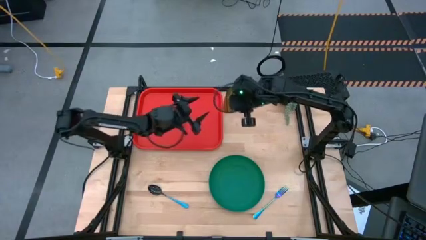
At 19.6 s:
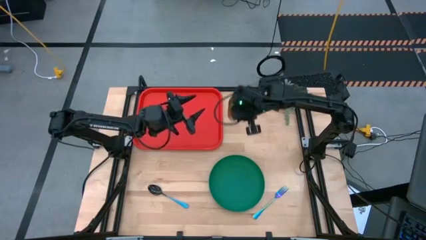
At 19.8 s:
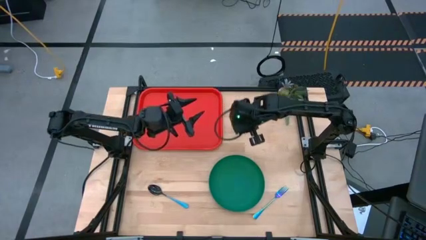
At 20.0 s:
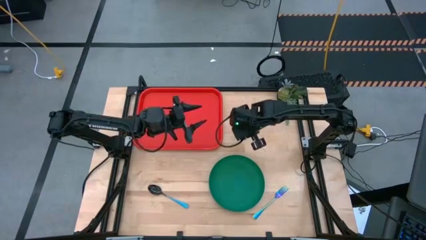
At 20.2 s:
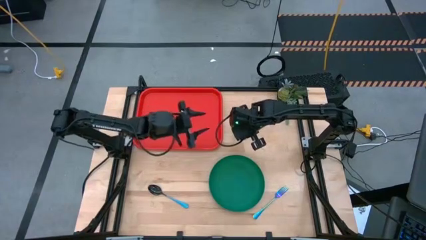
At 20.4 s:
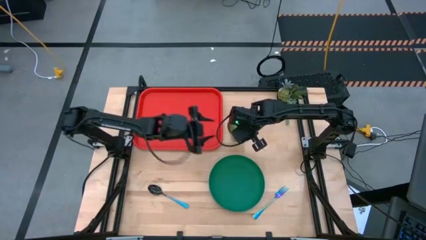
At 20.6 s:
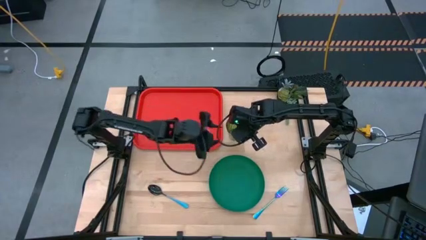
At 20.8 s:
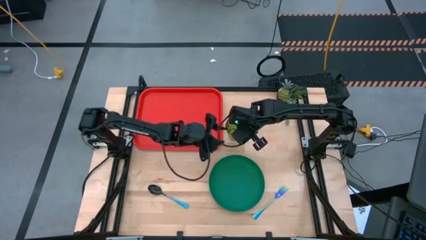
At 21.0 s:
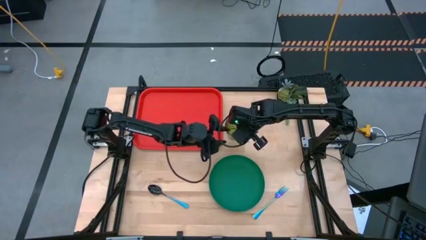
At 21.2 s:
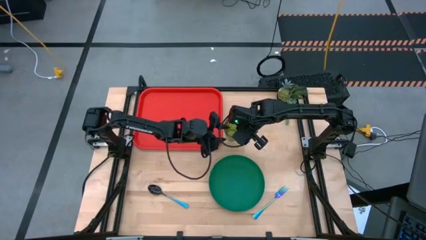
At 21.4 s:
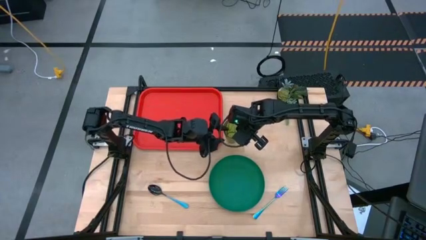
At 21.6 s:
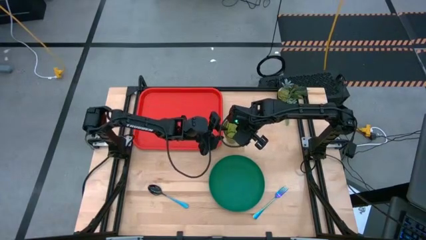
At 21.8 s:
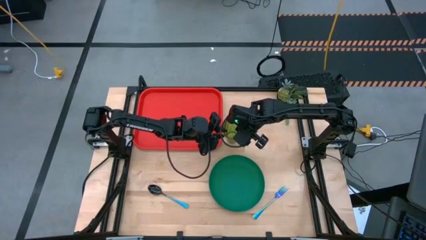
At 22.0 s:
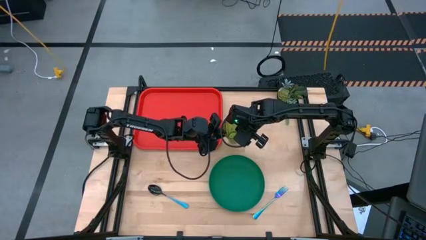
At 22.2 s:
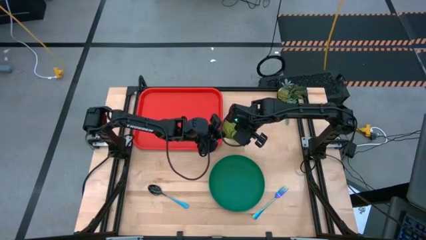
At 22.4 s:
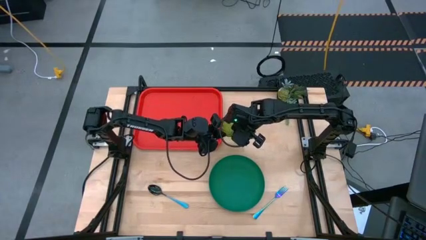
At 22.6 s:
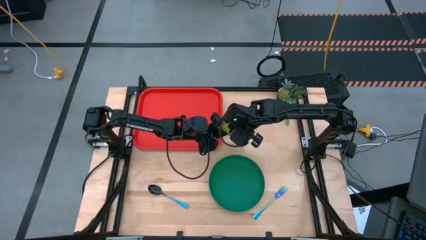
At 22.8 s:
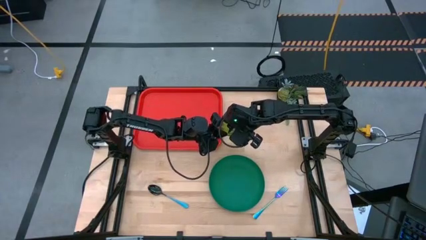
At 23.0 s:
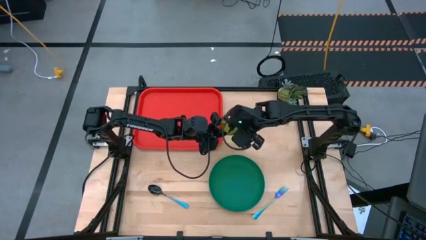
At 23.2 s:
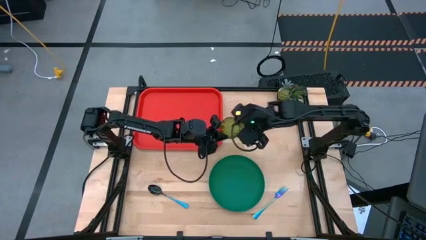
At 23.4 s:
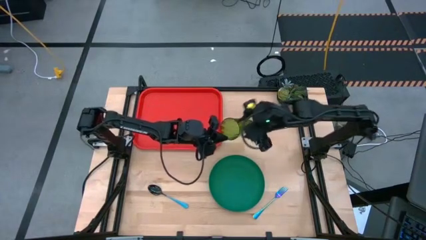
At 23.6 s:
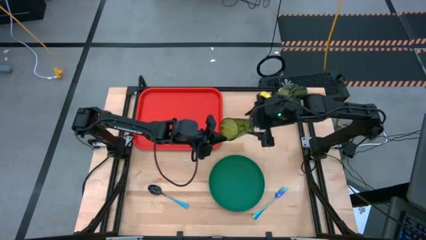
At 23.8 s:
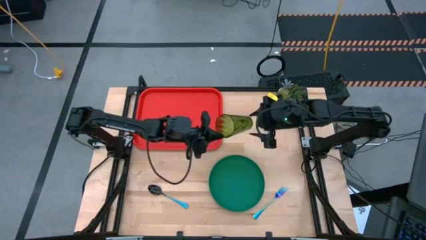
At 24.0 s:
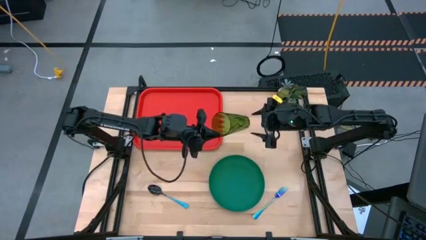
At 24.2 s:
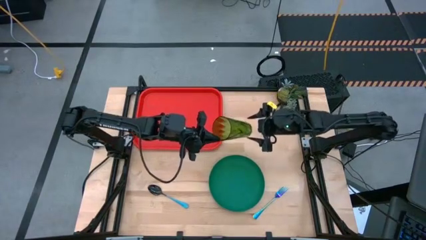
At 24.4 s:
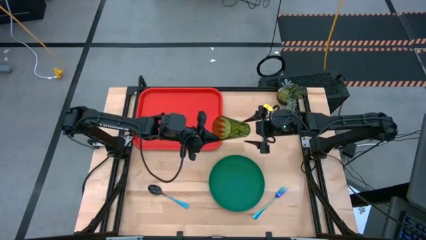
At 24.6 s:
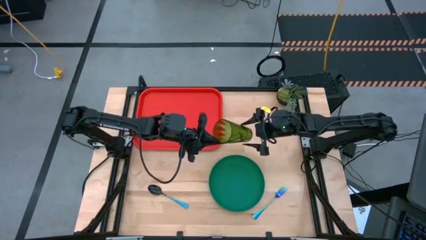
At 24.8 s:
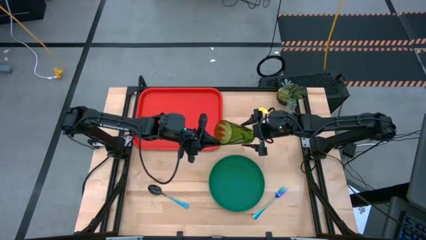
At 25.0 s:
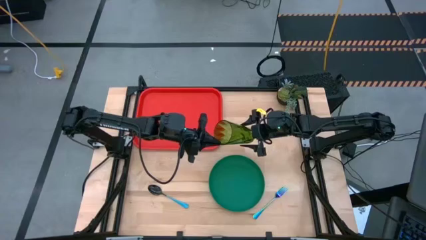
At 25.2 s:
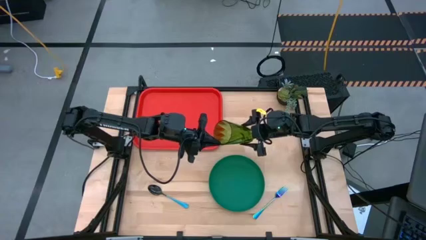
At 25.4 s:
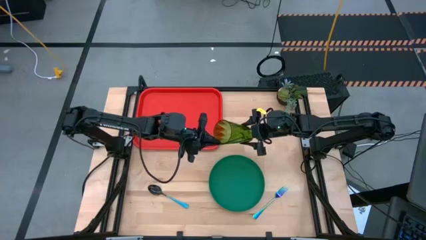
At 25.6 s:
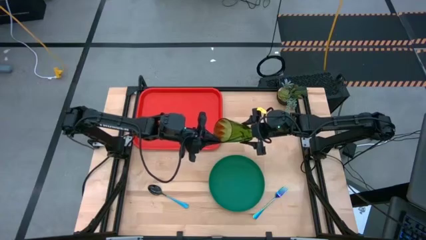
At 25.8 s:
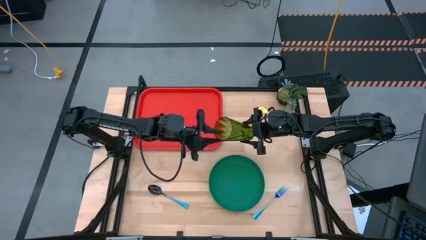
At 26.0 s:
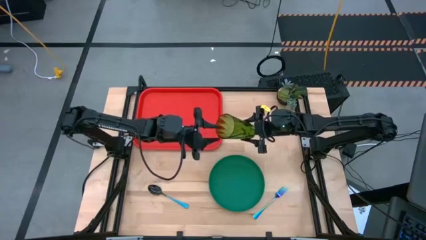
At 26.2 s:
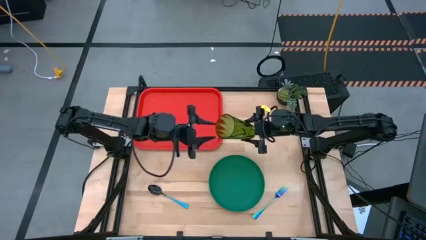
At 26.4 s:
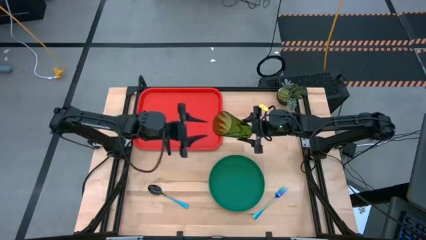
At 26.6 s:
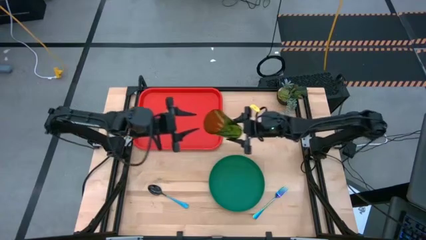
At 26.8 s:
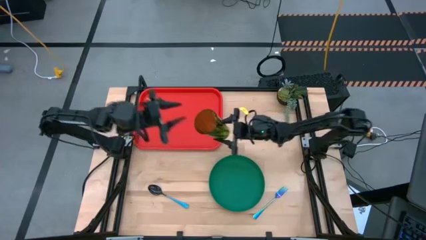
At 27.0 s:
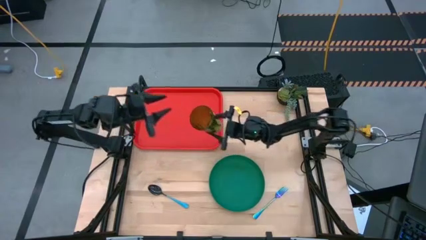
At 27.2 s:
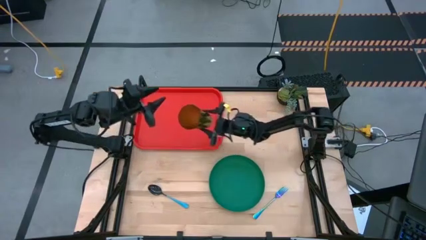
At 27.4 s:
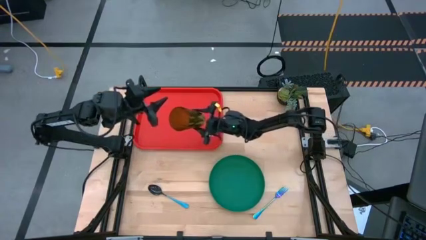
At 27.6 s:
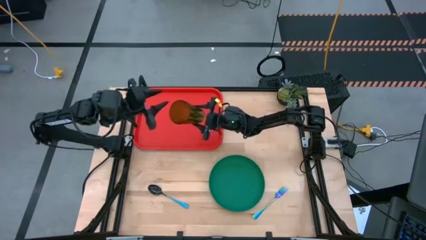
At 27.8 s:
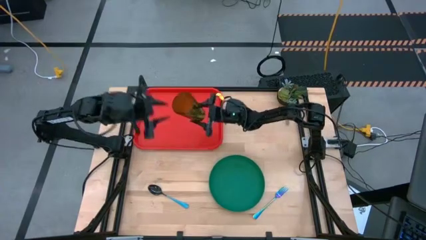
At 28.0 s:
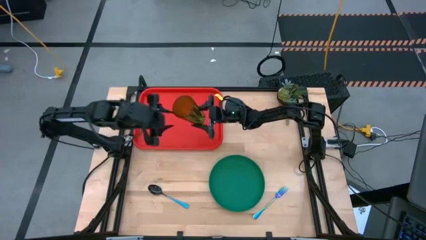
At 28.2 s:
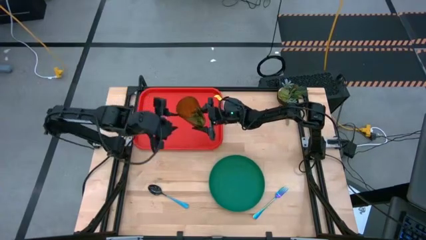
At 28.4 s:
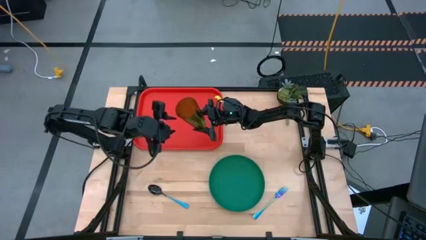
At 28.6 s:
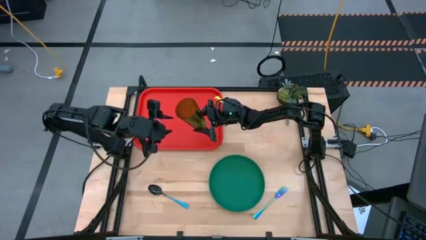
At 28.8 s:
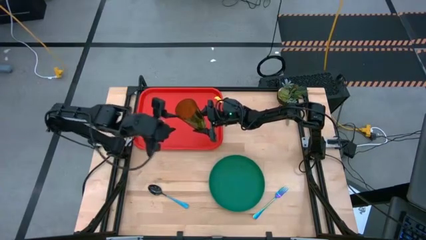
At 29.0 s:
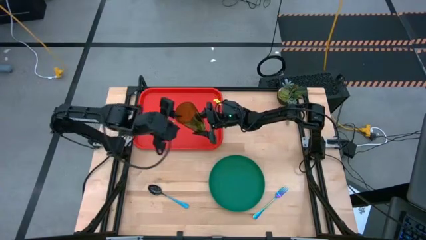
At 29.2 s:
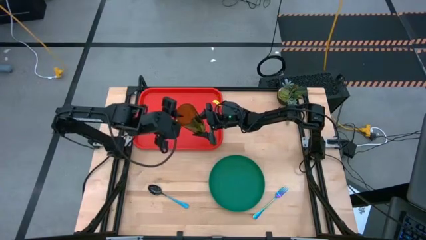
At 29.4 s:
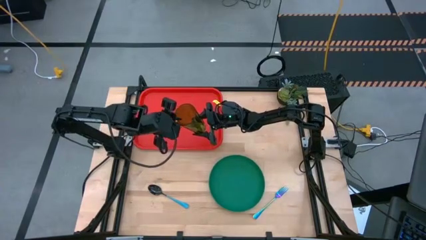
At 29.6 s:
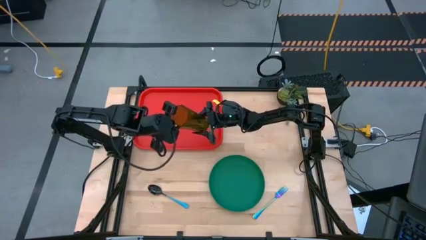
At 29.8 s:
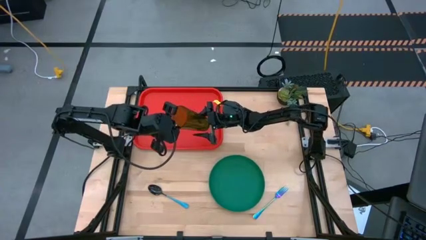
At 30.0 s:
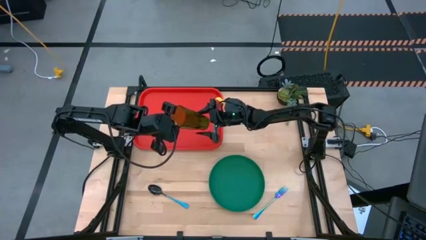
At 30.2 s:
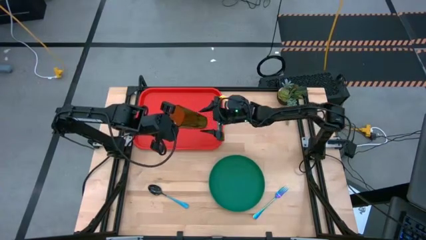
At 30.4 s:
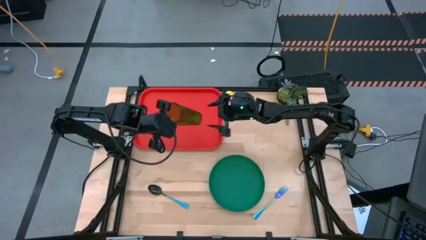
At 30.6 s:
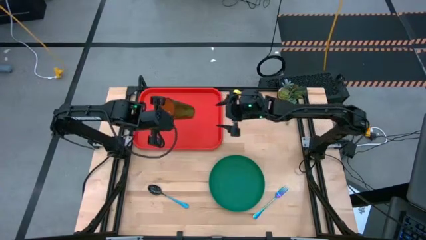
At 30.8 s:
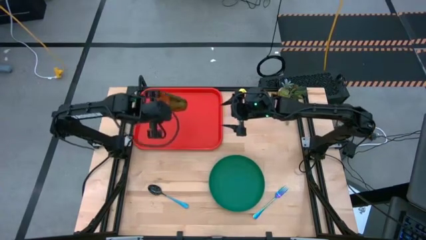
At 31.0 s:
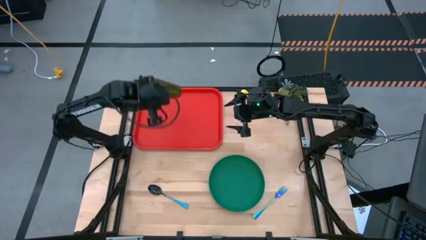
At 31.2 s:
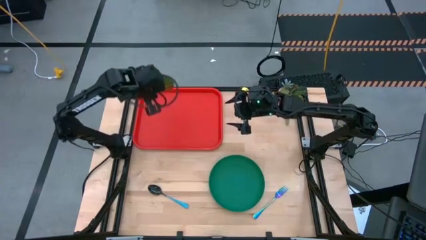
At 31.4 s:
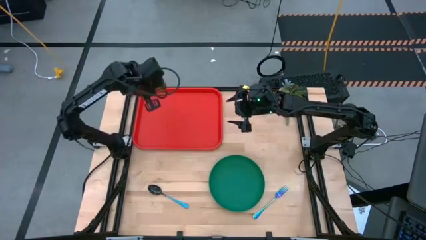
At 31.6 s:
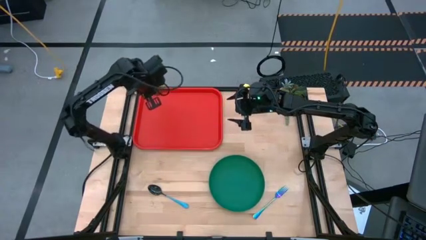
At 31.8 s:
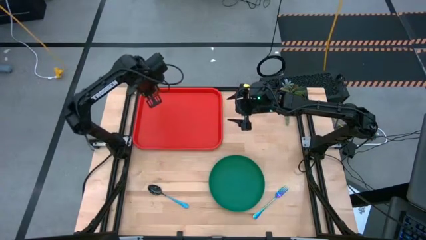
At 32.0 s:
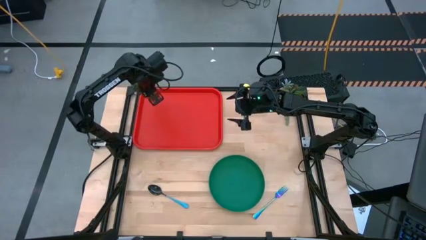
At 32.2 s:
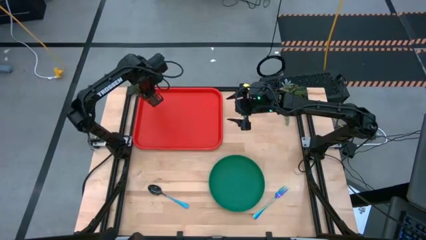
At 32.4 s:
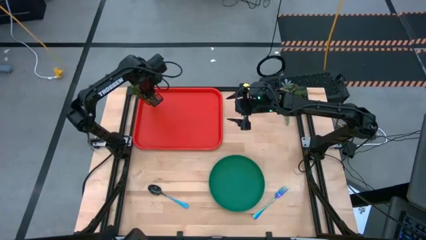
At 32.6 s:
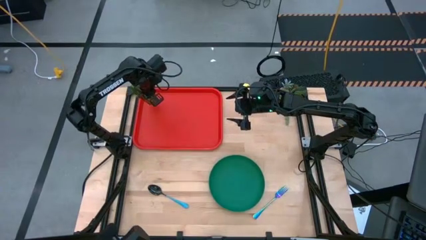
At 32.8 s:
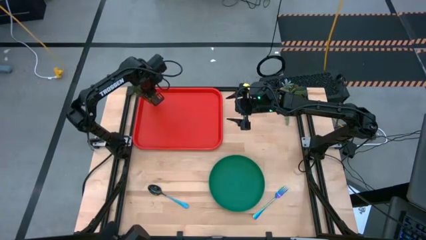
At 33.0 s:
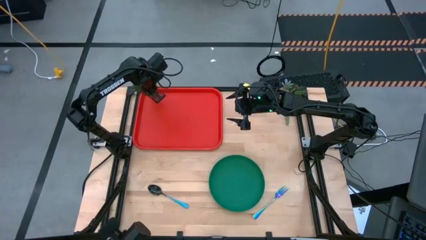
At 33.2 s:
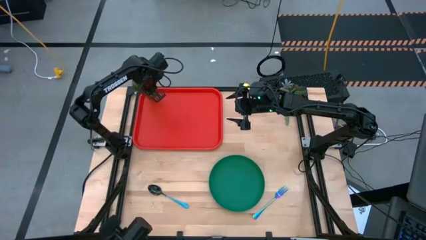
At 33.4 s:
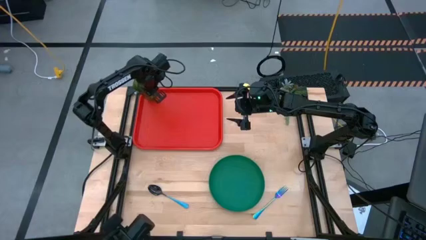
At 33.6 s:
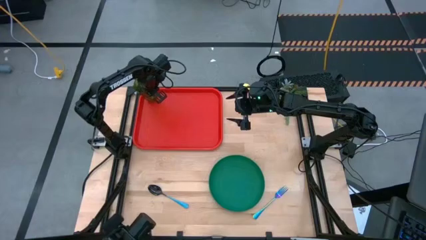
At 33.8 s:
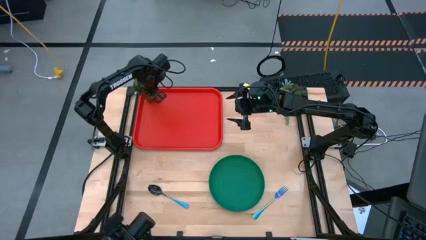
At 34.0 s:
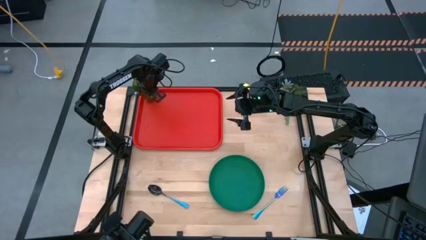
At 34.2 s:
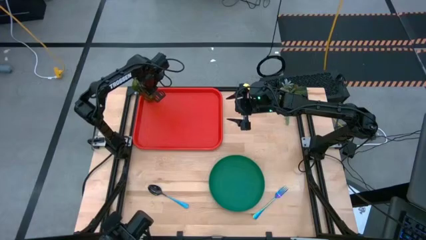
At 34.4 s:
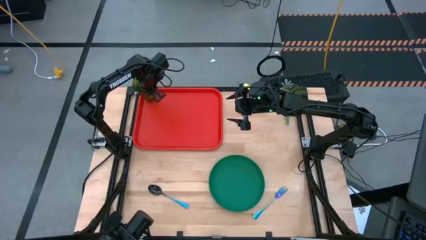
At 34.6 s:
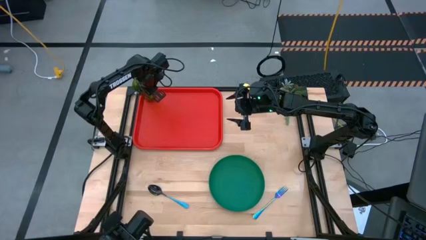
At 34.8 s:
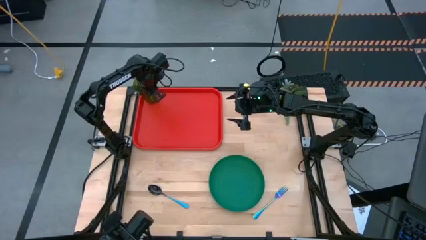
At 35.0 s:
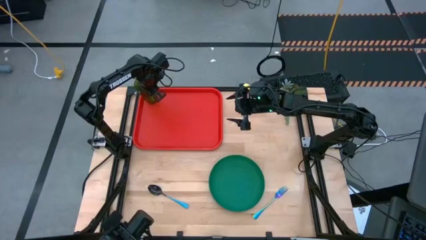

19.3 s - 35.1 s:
Task: Pick and place plate/cup/fork/spoon on tray
Put the green cup on the top left of the red tray
